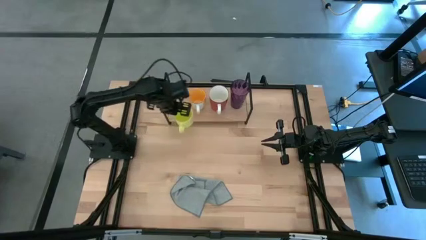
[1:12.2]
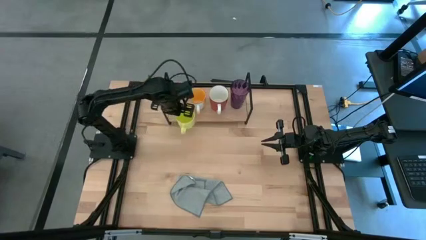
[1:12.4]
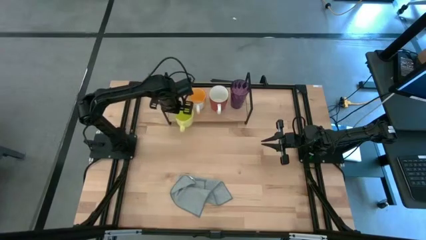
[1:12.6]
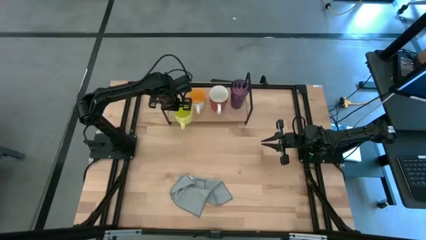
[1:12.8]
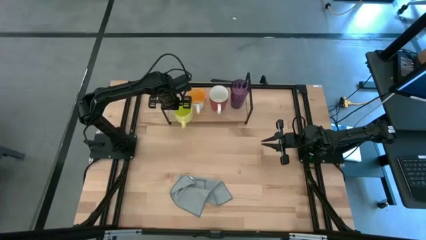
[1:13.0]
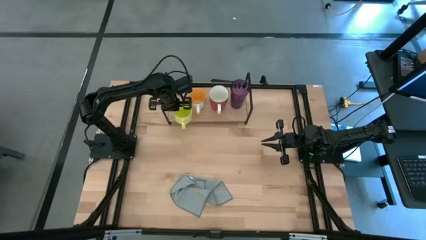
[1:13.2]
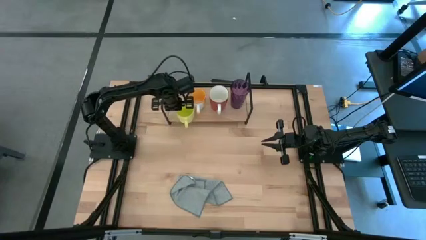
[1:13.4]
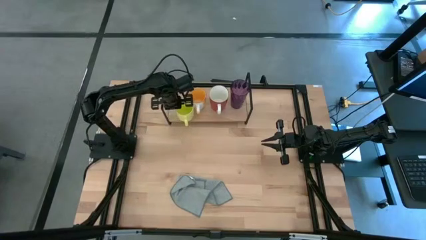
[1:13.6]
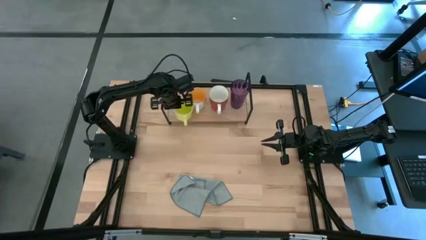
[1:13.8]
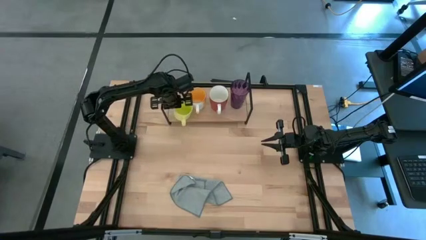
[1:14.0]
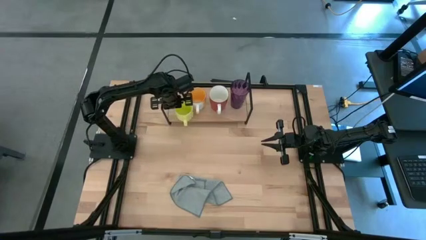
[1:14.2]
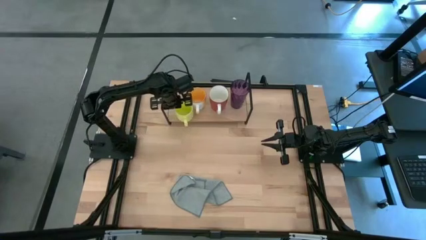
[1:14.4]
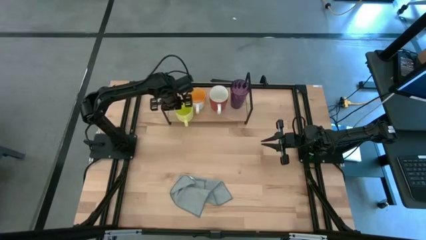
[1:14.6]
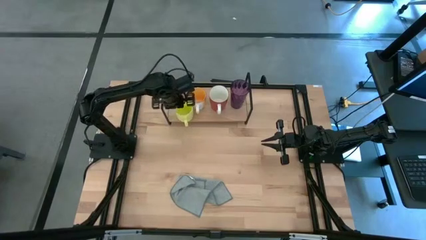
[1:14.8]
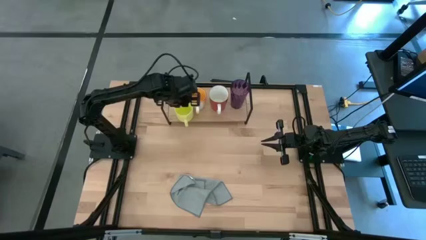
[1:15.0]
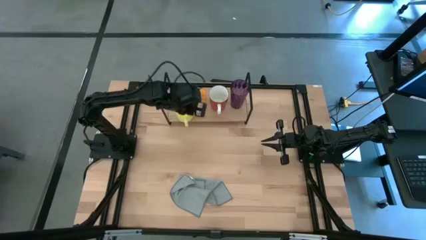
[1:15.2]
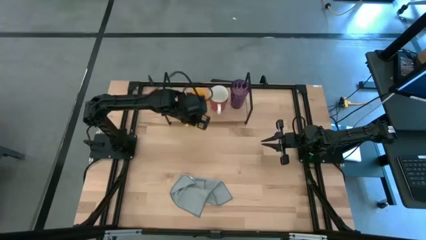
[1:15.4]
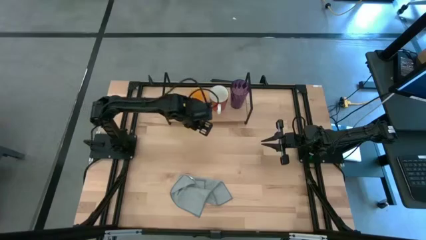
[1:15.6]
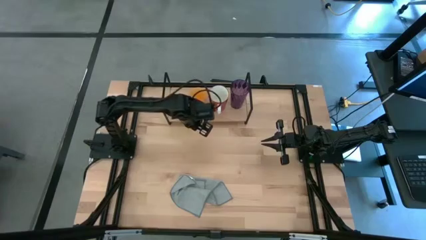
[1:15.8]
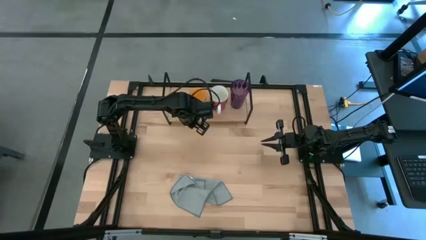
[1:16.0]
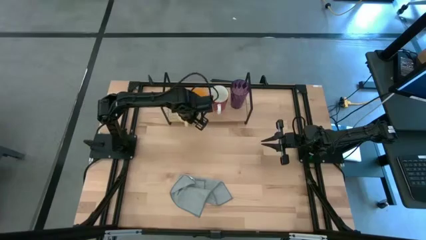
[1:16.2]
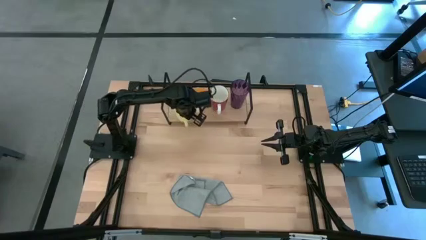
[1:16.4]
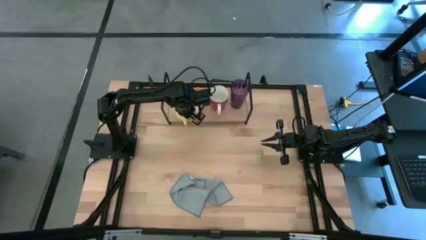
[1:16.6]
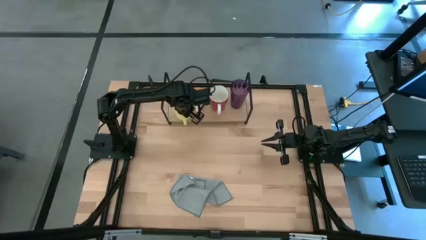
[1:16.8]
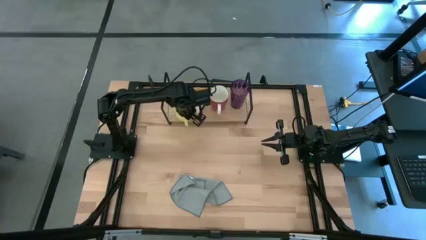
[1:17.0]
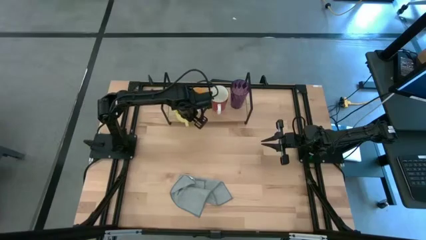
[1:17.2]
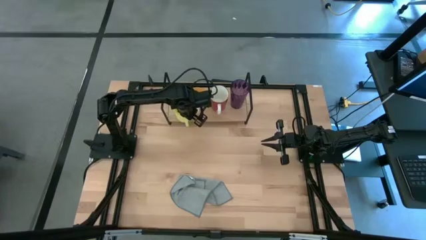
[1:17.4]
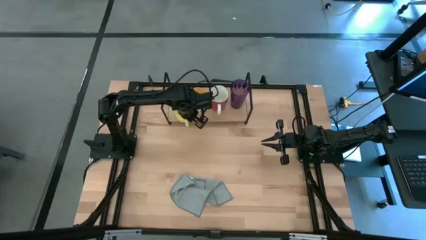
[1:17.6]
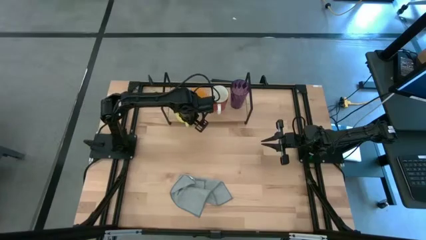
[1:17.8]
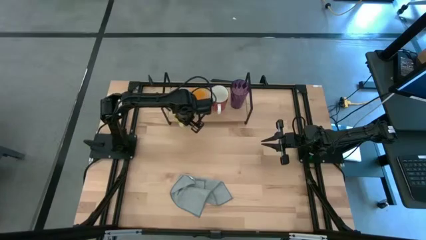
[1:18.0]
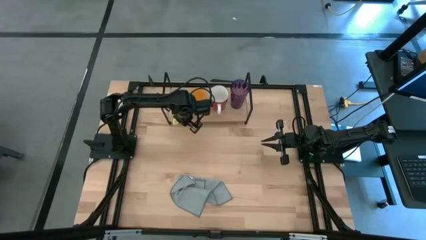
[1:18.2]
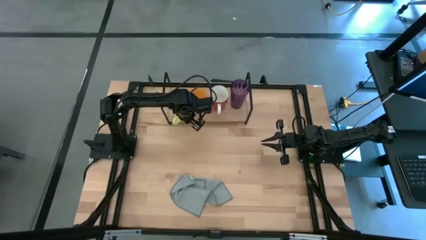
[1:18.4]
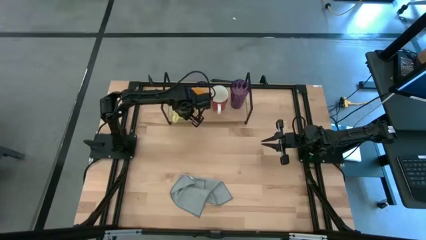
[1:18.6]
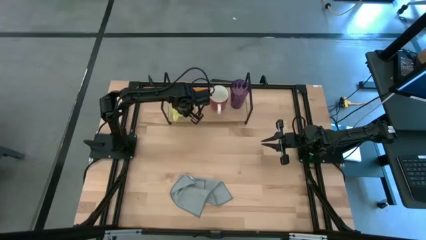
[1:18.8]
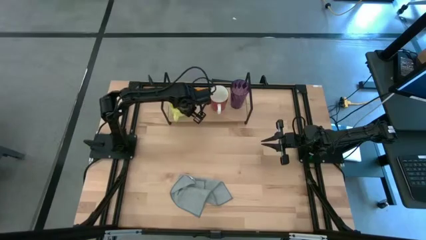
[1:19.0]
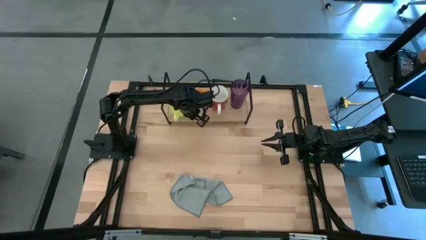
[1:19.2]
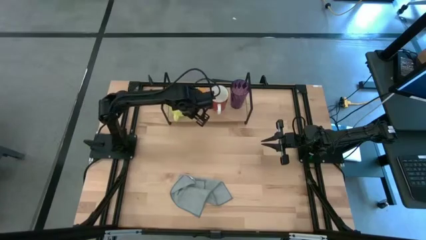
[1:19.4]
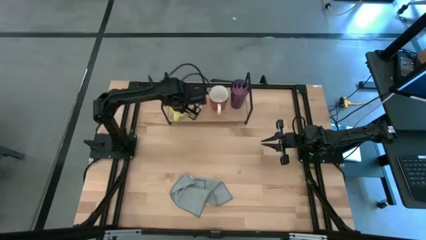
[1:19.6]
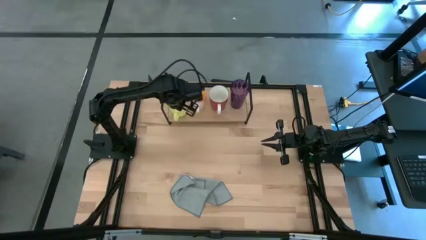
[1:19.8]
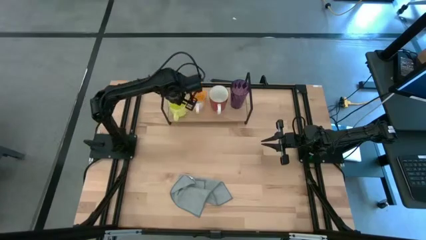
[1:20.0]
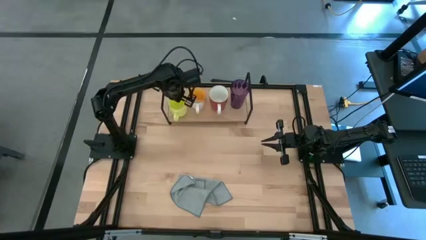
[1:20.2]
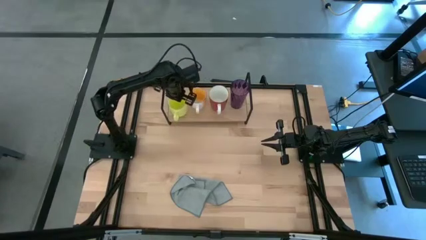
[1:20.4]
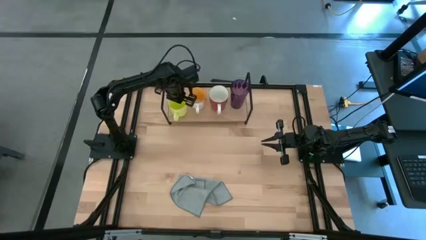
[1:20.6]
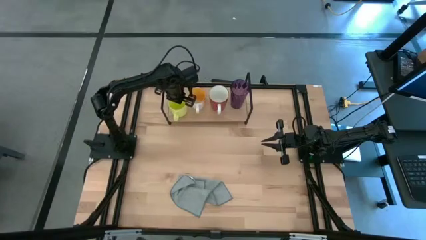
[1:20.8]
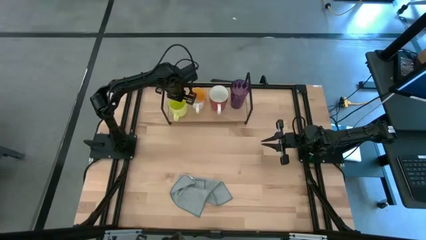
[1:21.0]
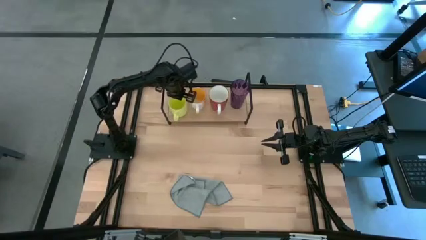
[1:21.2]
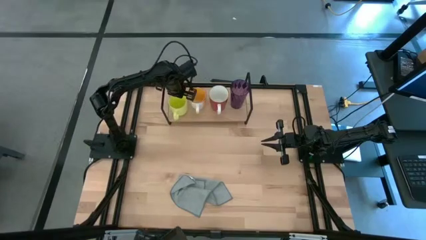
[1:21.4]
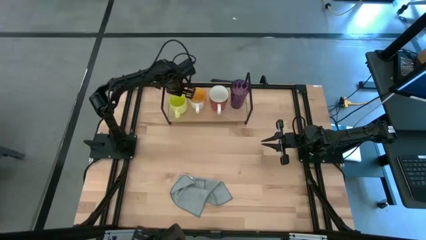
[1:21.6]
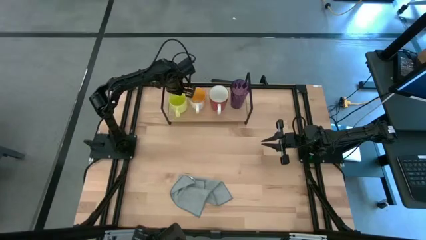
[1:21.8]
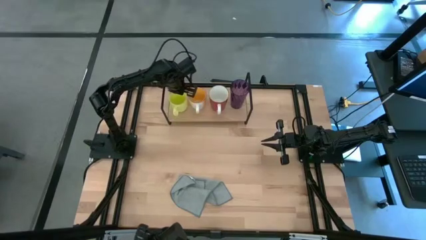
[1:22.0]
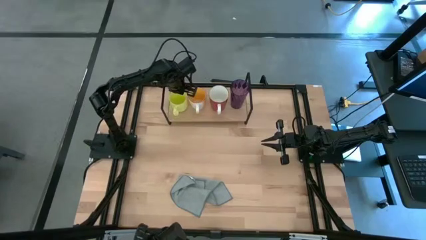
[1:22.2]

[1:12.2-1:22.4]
Task: Stack small to large cups/mugs on shelf
Put the yellow-green mug on the shelf

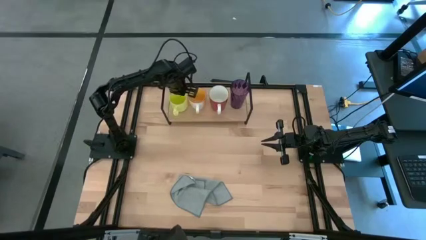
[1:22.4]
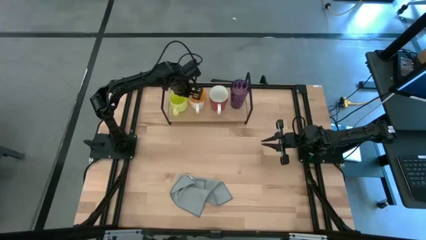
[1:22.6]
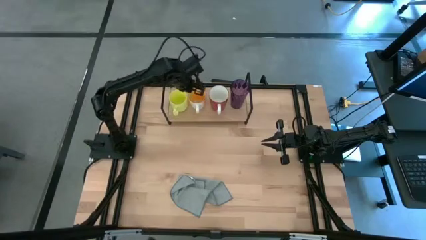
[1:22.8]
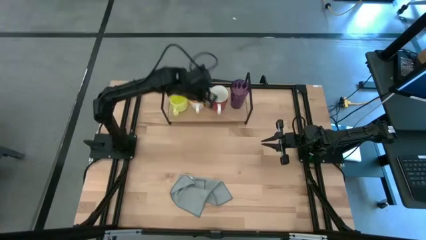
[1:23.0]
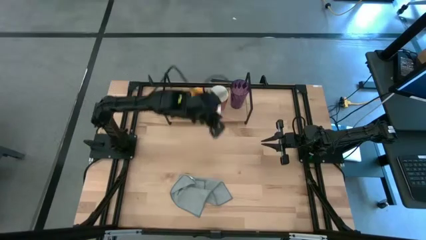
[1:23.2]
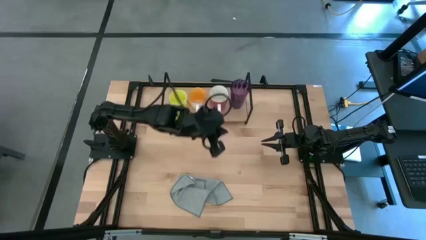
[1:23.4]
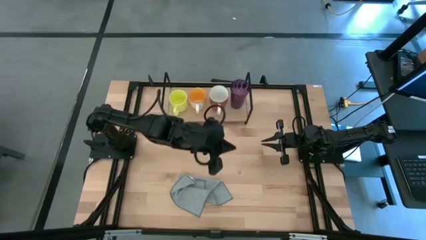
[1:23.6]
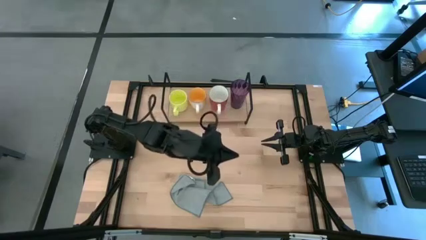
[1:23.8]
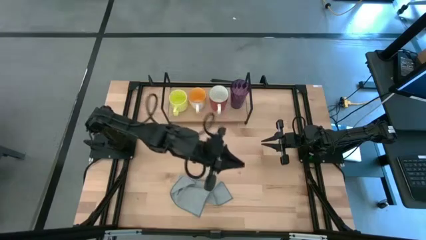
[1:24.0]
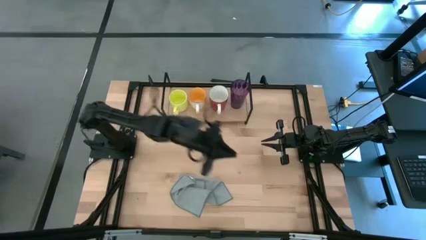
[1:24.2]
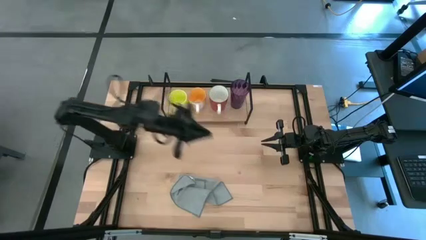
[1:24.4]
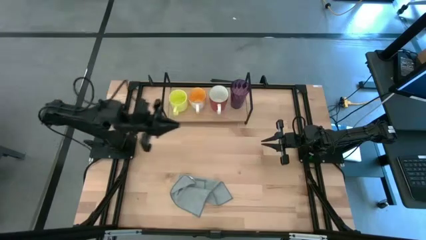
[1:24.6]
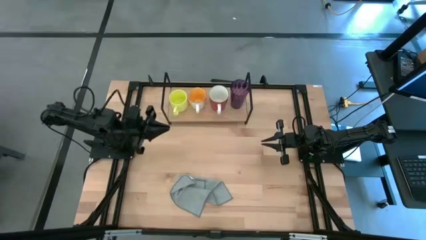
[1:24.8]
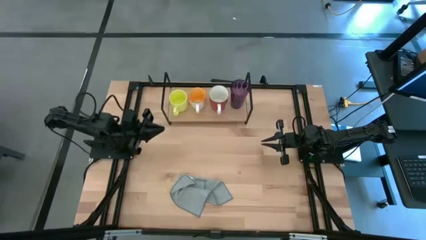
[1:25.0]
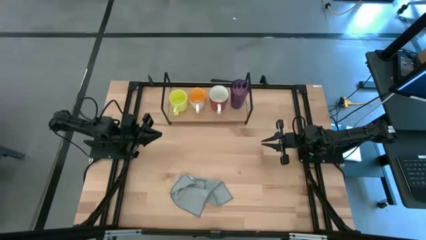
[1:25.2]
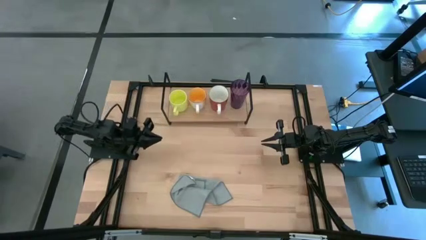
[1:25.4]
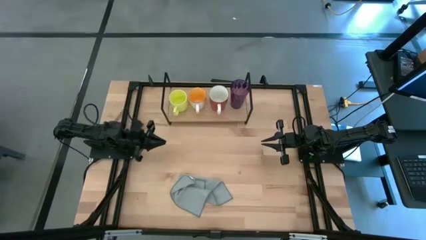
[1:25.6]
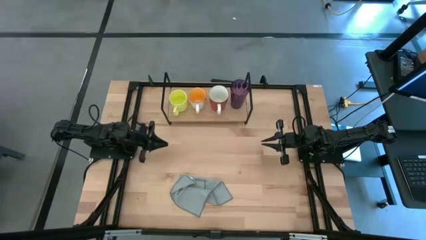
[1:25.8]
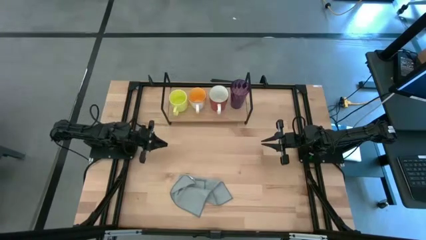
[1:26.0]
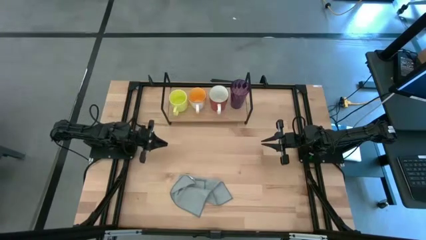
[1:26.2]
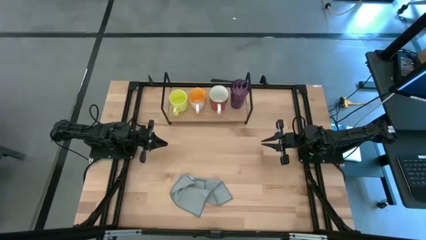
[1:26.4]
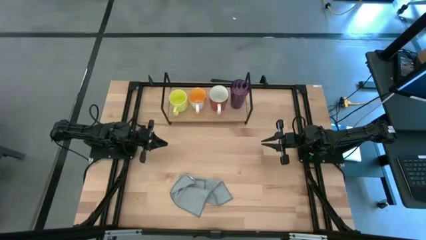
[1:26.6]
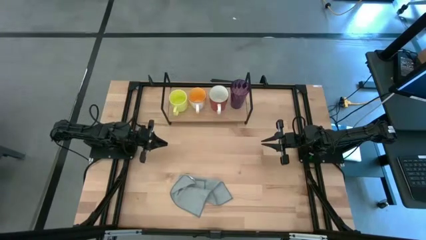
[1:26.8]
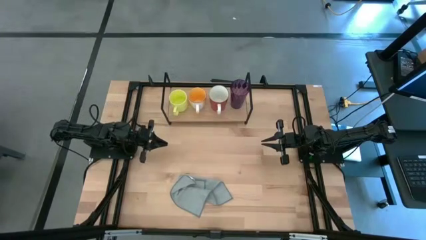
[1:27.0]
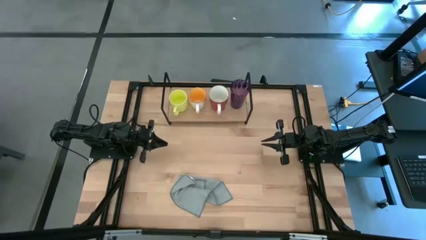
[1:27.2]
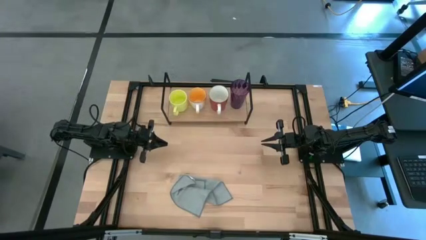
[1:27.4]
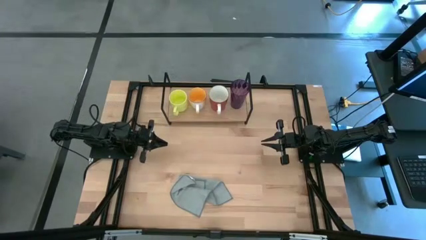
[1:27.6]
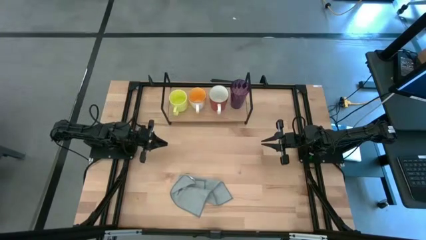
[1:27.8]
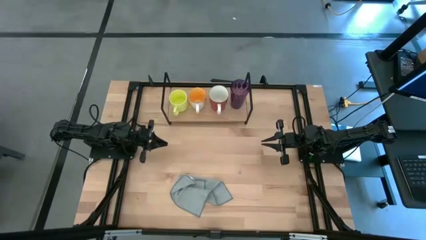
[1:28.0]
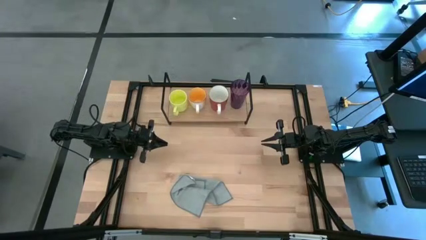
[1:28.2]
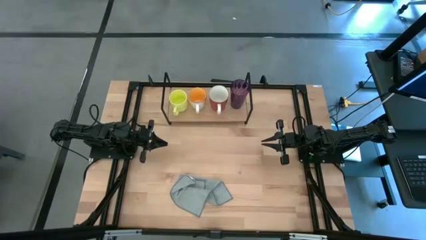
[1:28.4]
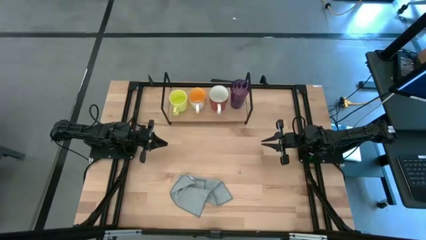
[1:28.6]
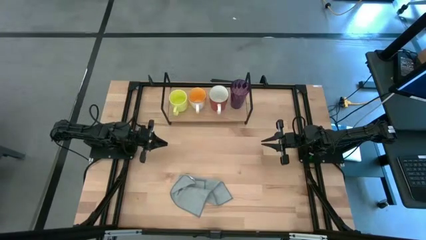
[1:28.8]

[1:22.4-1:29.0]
Return to Home Position
